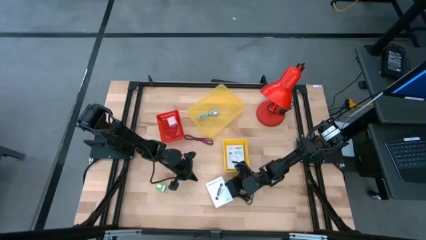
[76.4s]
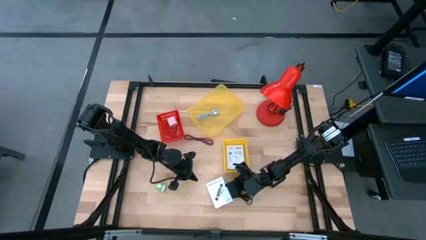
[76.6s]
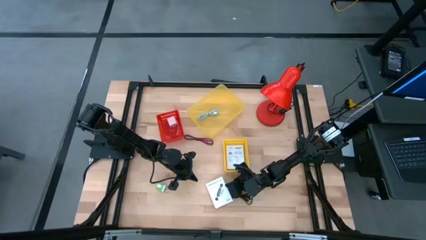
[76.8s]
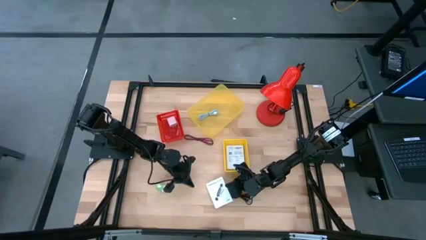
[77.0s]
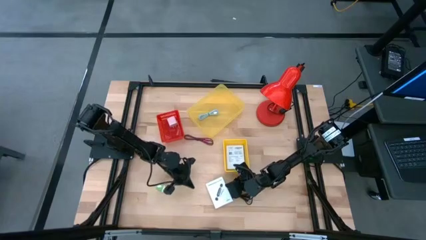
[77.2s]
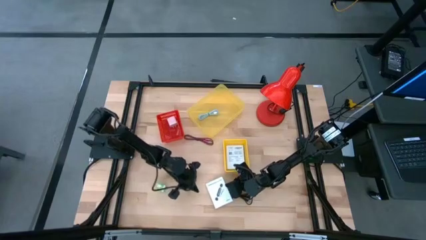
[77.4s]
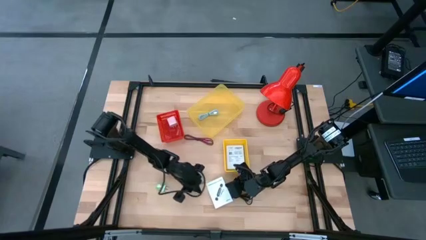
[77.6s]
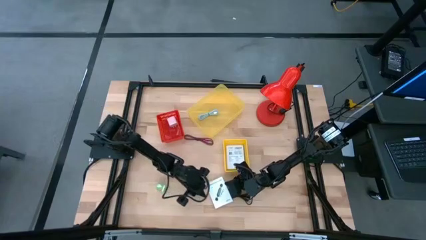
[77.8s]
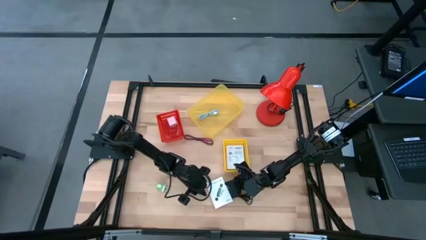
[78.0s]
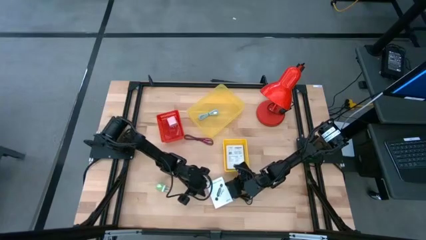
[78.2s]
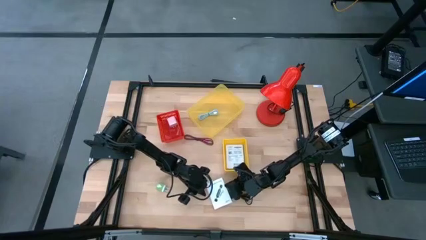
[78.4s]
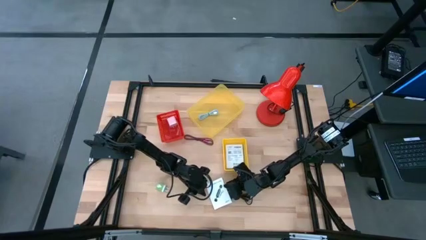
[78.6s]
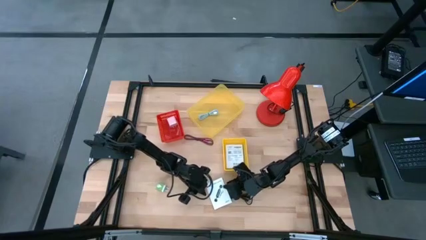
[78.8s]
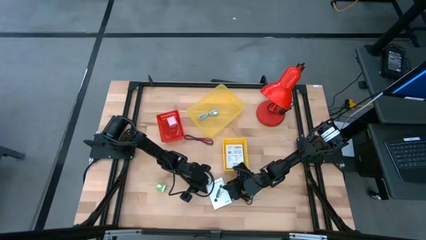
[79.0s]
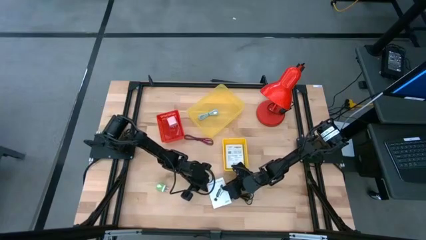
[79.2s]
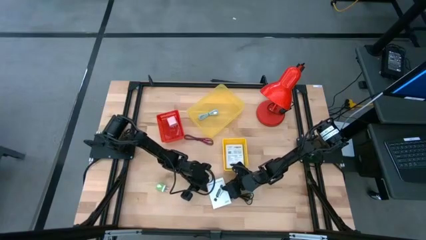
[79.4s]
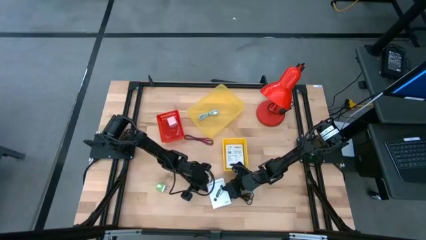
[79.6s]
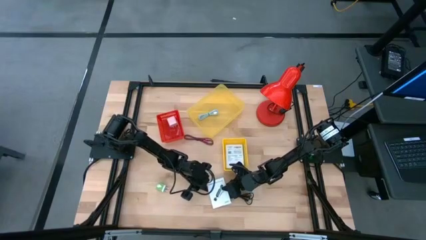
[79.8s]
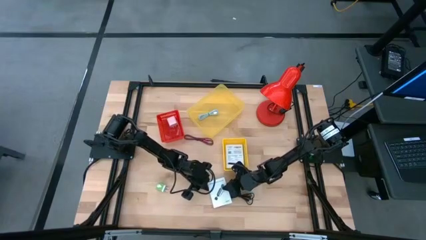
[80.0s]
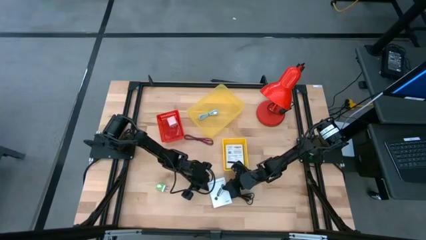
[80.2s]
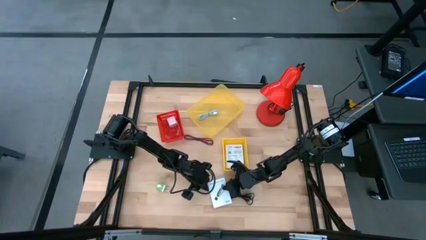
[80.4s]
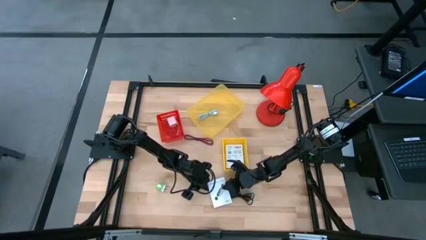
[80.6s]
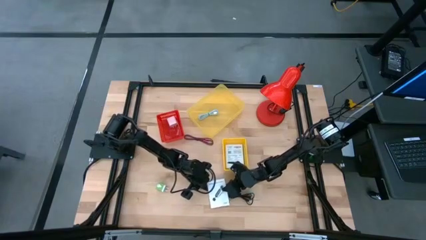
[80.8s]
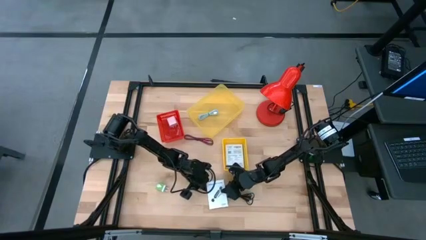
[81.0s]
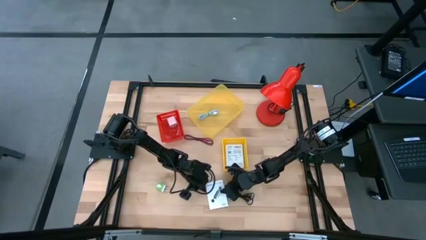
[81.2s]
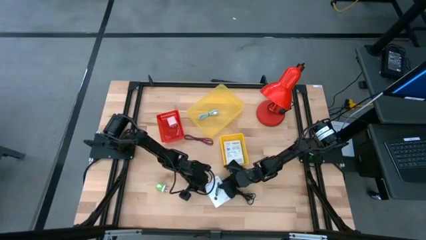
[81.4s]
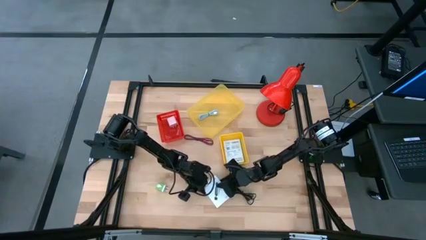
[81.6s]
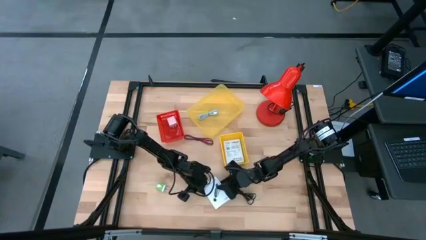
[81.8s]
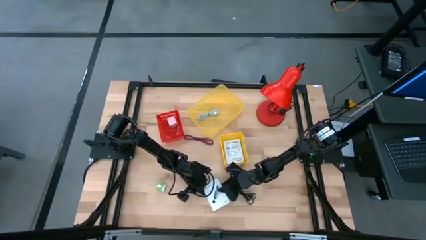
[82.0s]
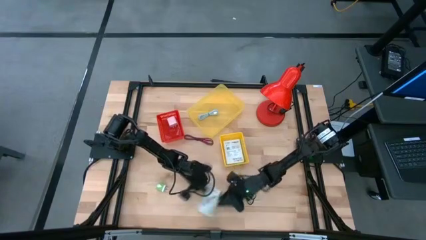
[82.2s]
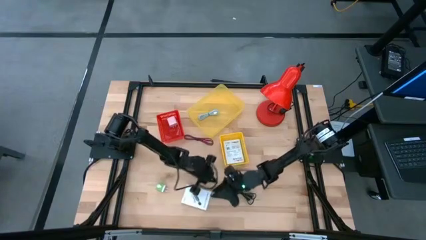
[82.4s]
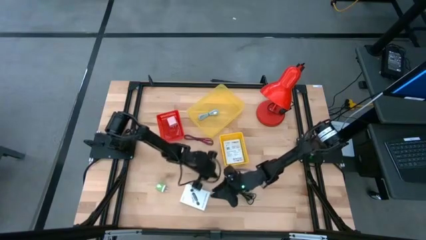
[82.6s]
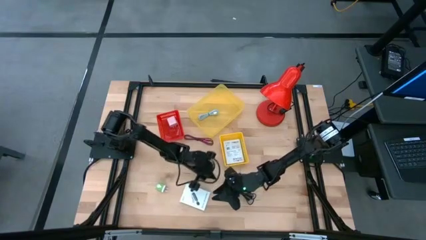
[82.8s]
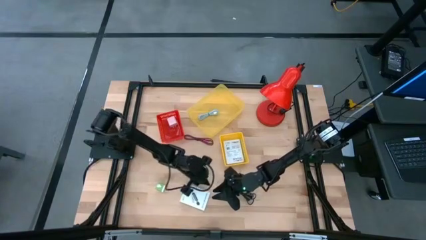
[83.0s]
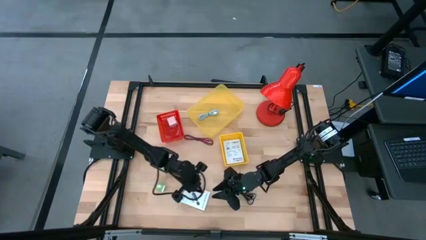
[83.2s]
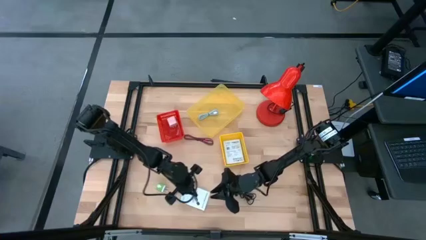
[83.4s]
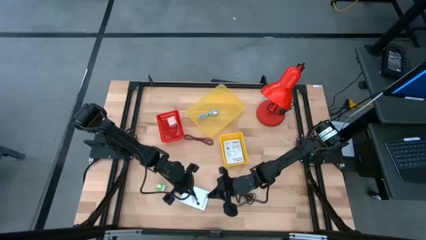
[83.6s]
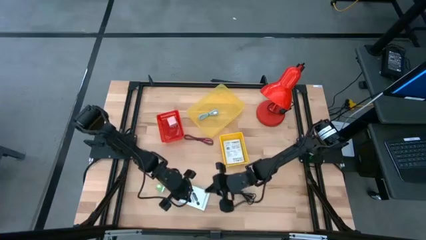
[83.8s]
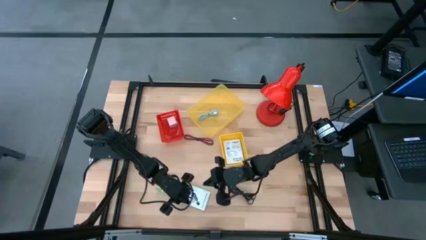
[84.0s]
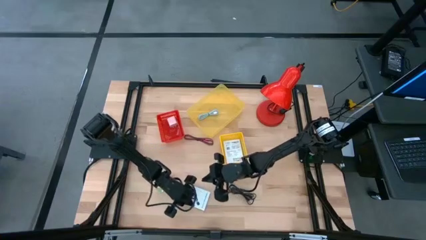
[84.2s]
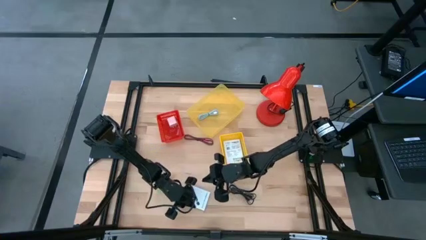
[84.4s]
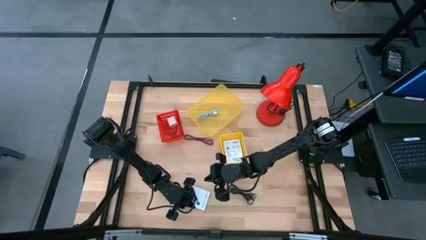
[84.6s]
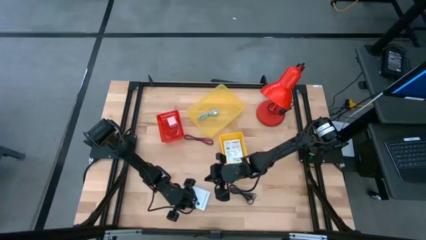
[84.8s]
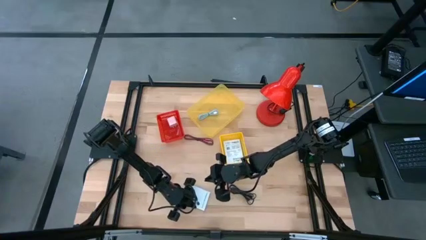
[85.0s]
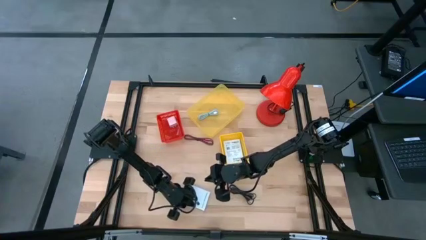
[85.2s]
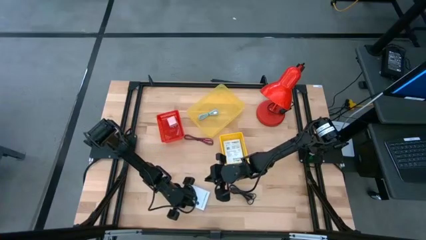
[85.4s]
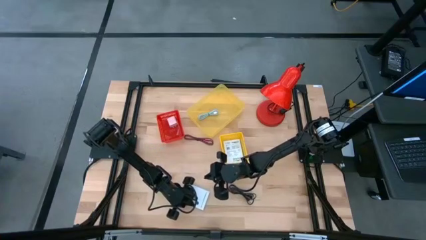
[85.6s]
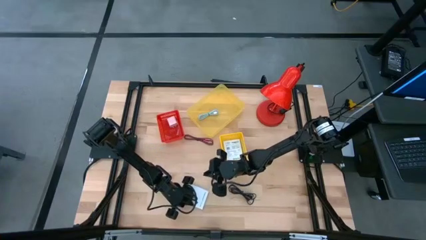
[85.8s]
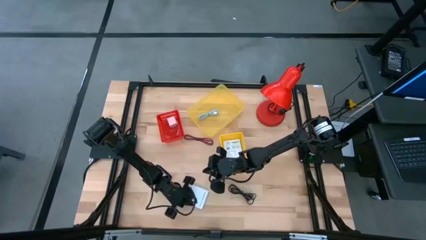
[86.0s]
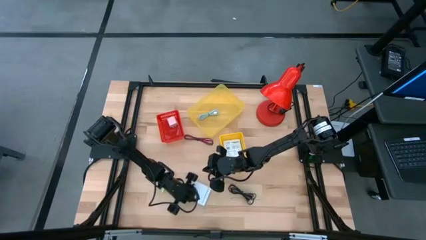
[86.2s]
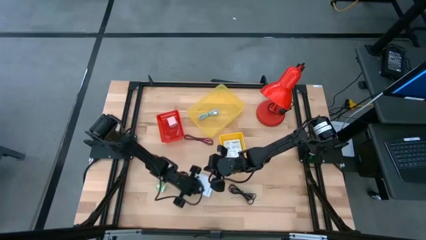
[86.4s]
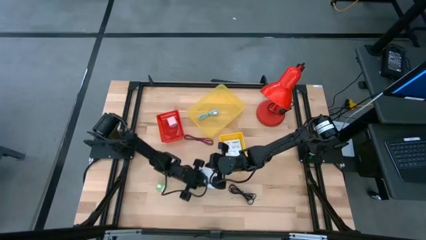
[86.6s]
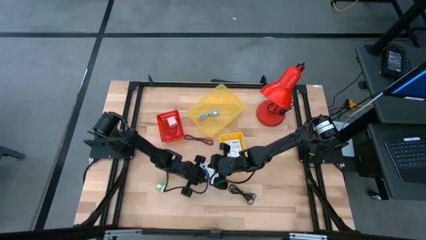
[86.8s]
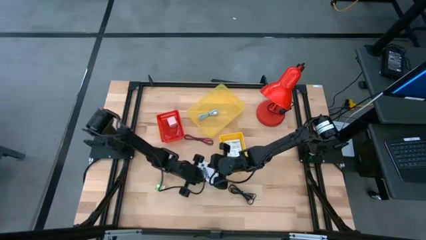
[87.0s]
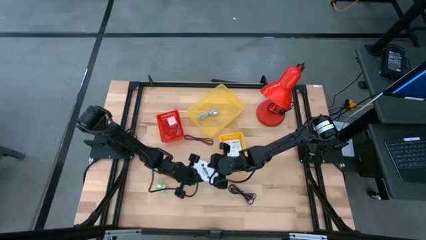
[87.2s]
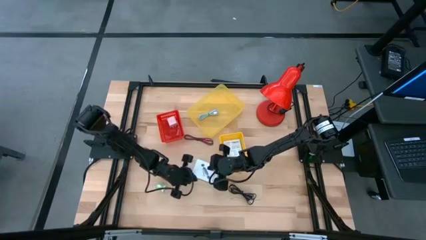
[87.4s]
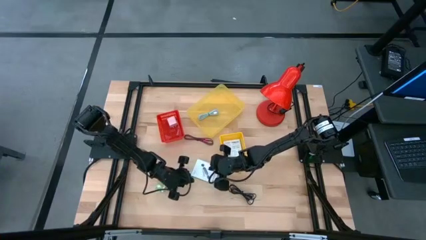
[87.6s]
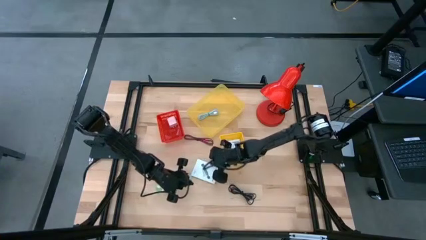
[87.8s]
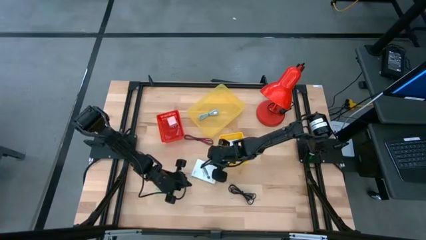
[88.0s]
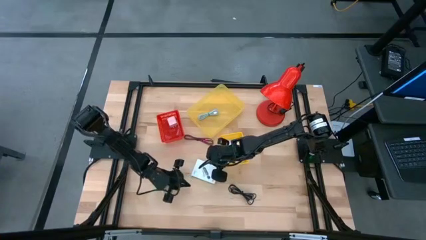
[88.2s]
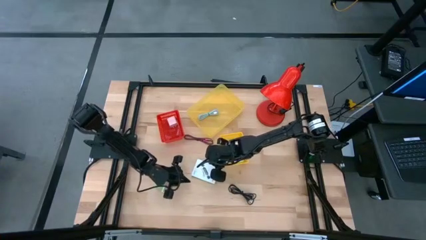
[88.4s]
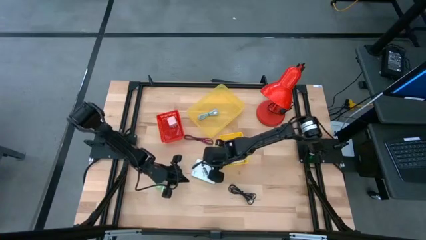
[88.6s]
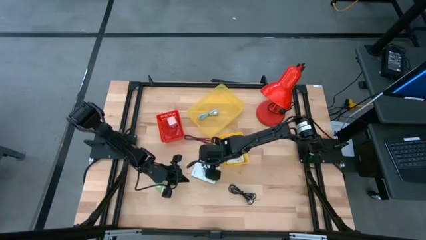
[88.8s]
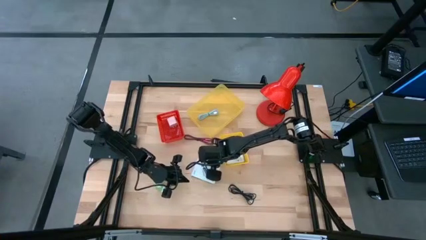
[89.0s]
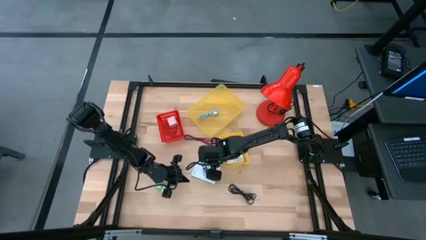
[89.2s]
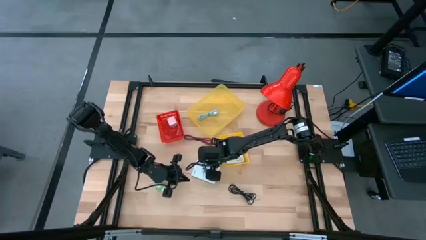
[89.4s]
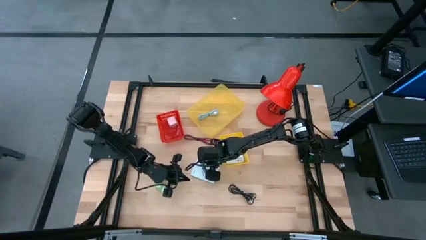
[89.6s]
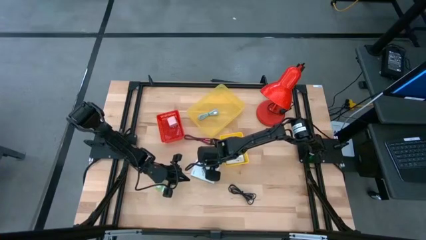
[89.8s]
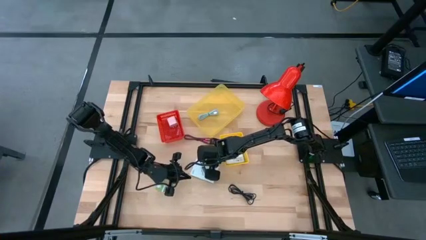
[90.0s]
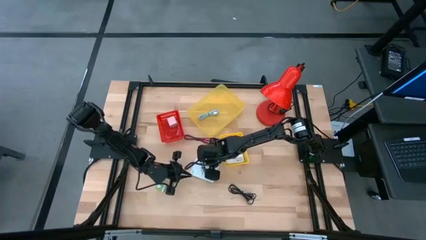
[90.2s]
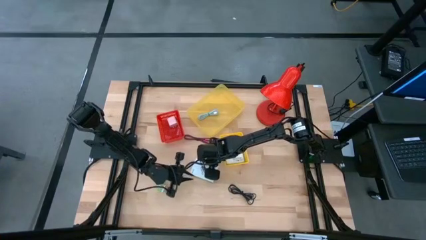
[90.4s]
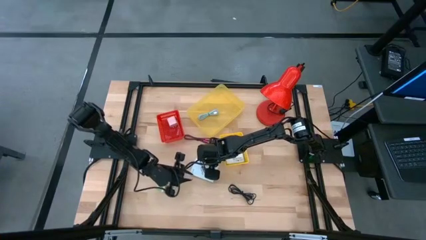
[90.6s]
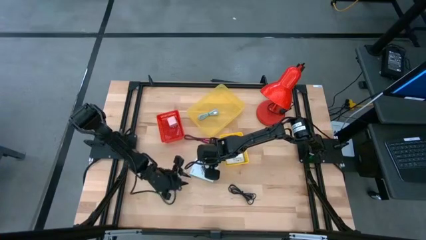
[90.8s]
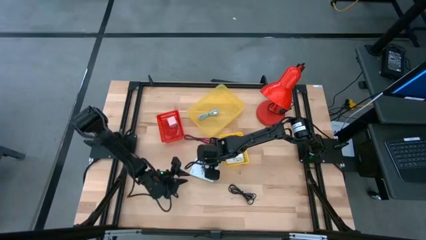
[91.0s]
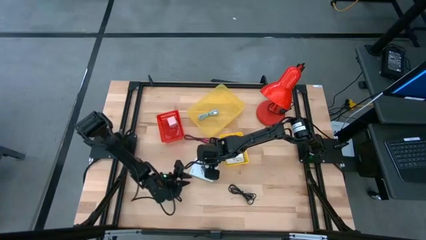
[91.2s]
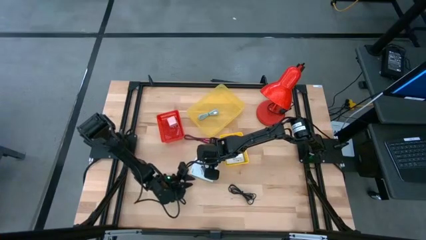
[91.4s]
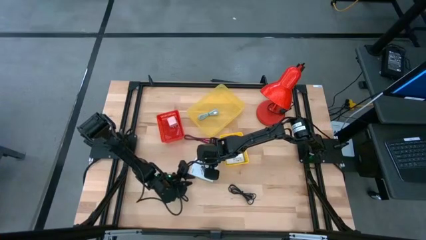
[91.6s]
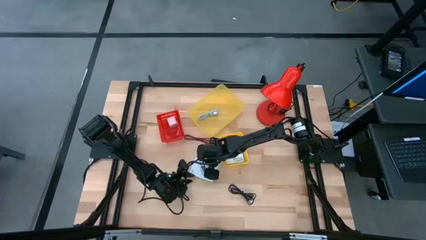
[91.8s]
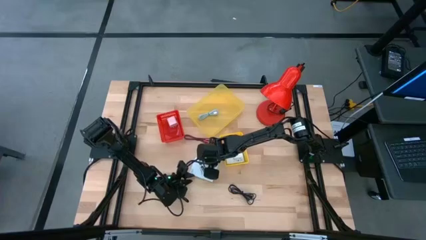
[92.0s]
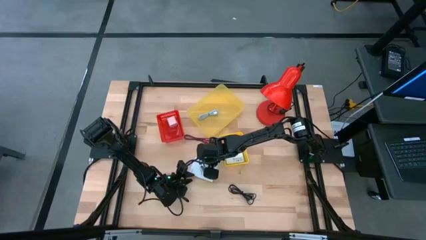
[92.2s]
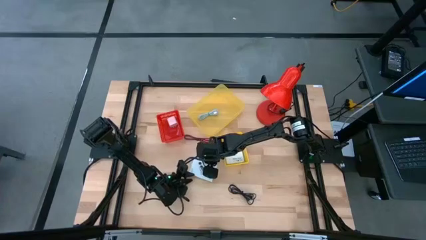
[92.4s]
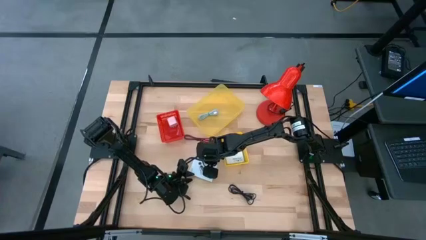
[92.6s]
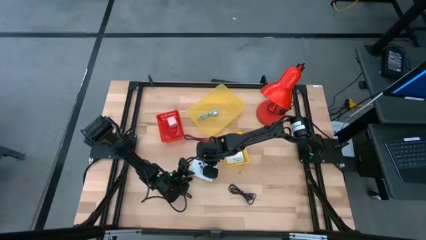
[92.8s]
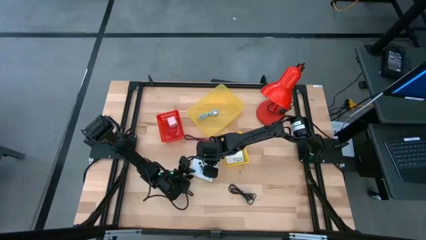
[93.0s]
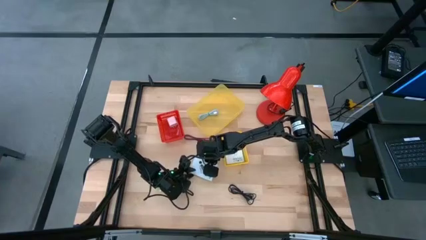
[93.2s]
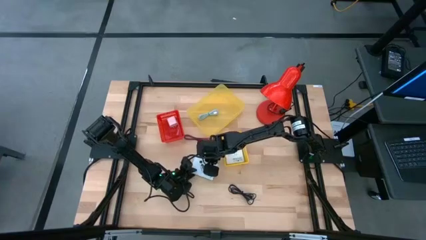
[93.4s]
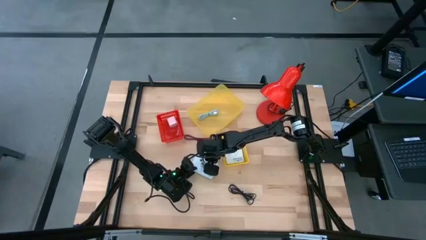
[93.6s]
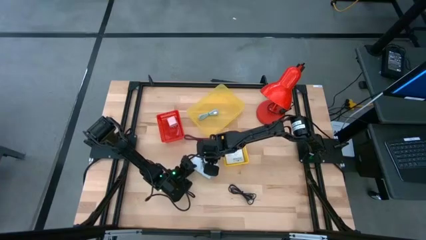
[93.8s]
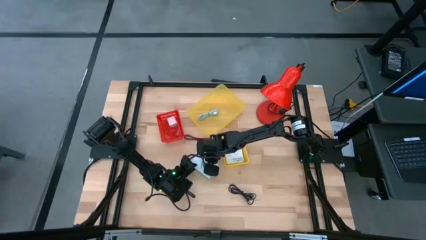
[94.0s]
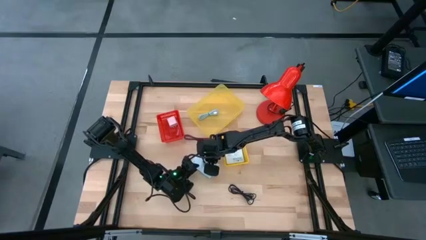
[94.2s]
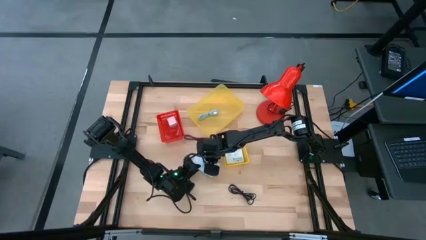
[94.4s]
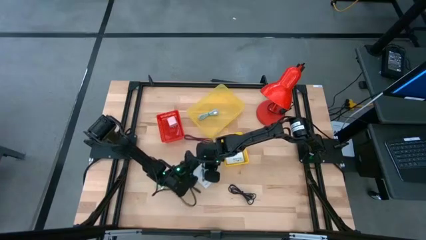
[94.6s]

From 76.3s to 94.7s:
Task: Pick and place items into bin
Stack the white box on top of the white box
